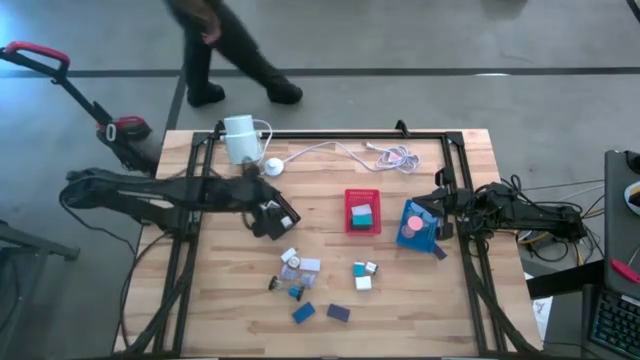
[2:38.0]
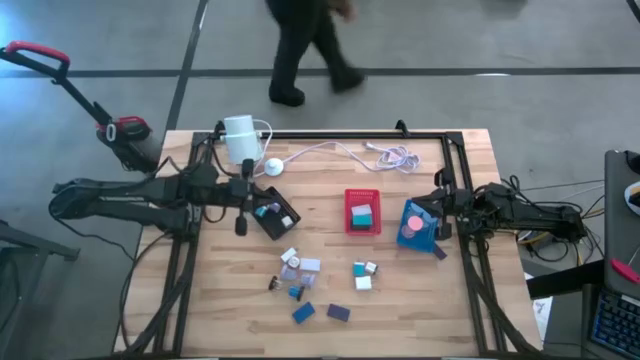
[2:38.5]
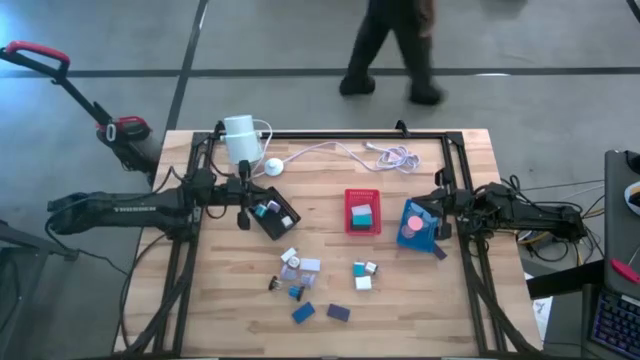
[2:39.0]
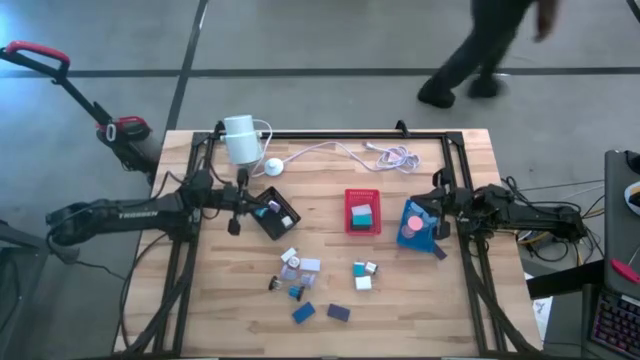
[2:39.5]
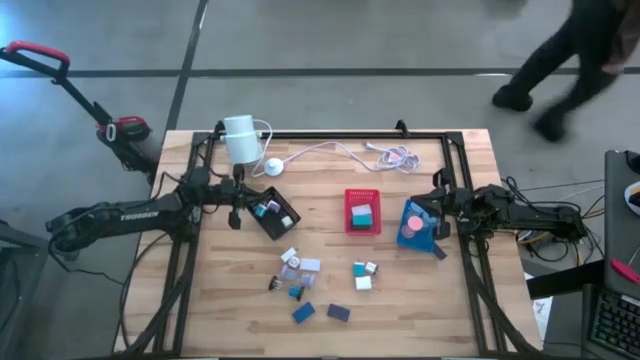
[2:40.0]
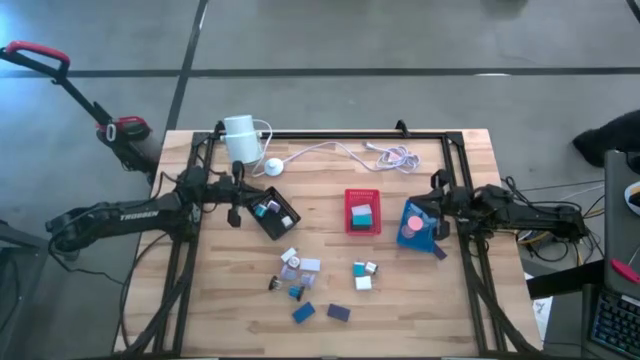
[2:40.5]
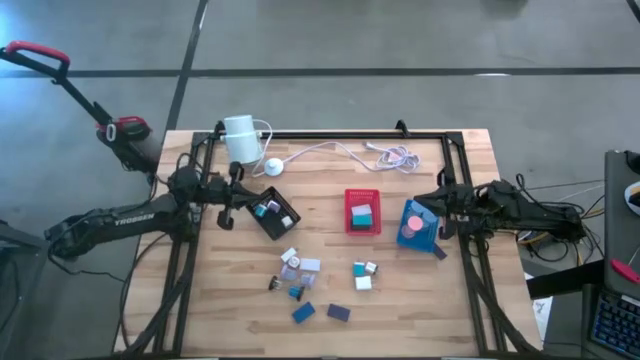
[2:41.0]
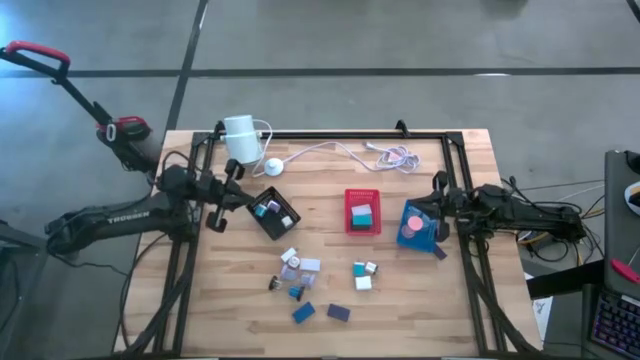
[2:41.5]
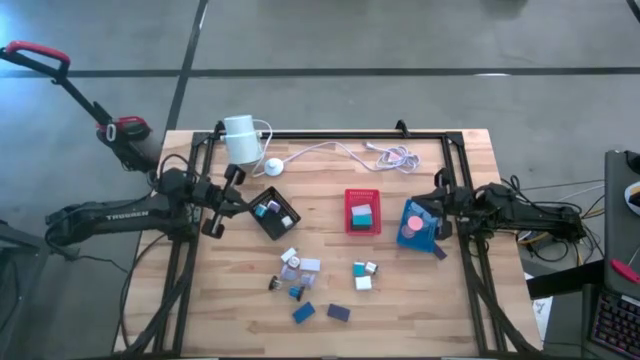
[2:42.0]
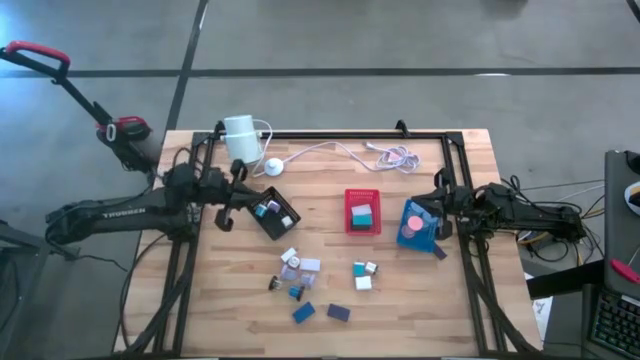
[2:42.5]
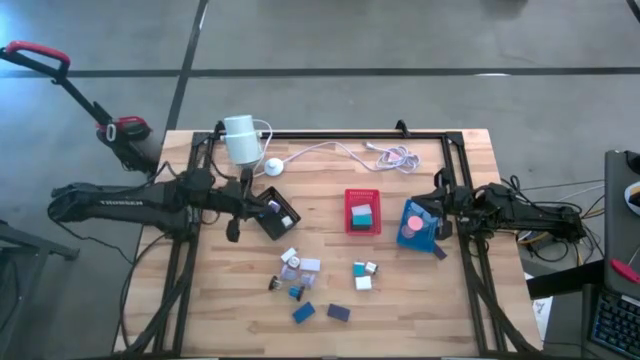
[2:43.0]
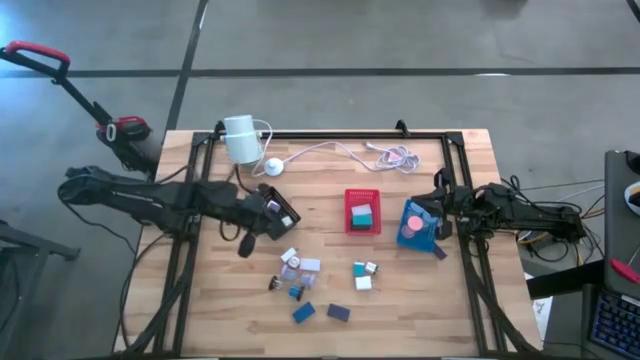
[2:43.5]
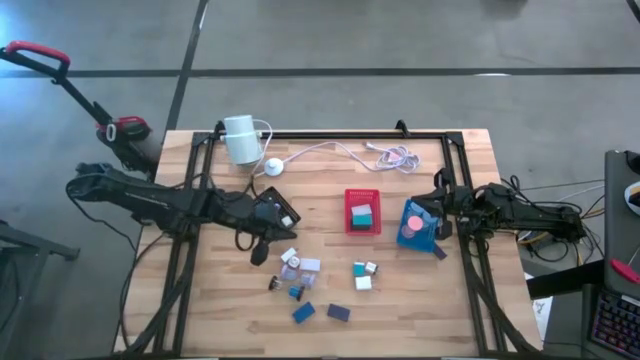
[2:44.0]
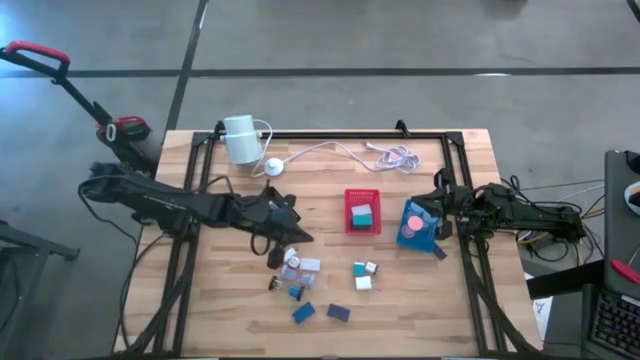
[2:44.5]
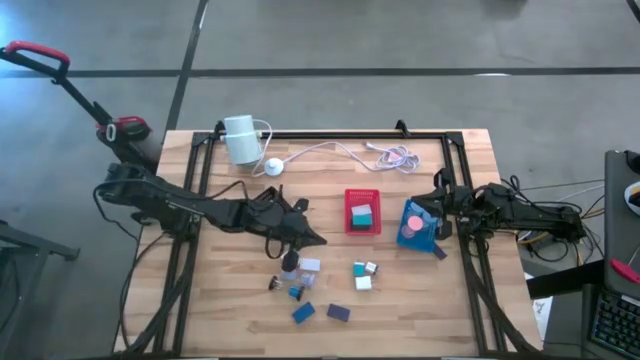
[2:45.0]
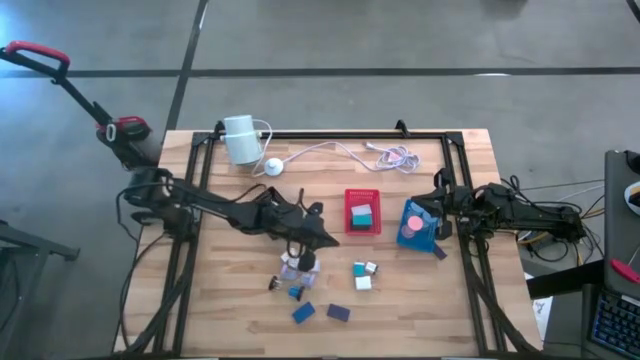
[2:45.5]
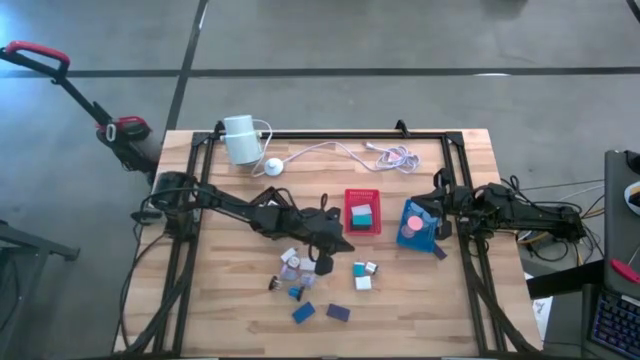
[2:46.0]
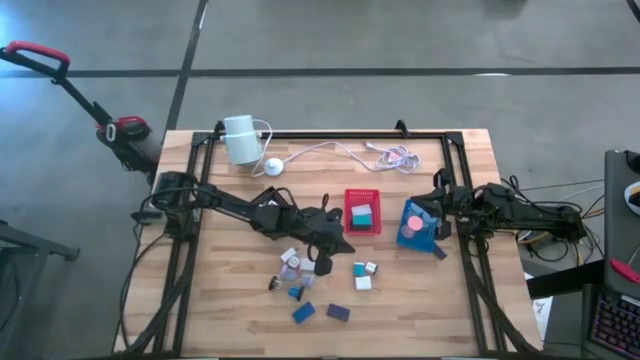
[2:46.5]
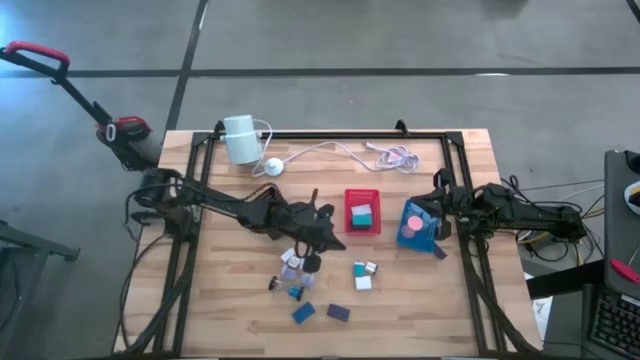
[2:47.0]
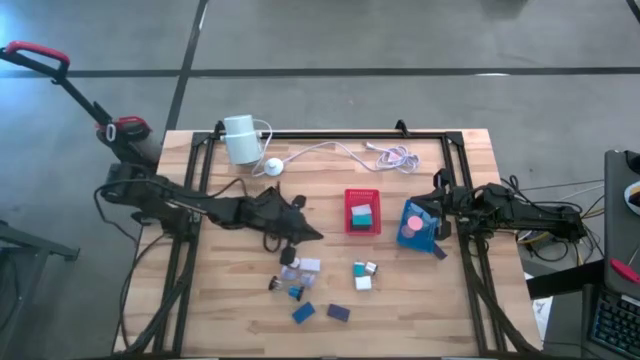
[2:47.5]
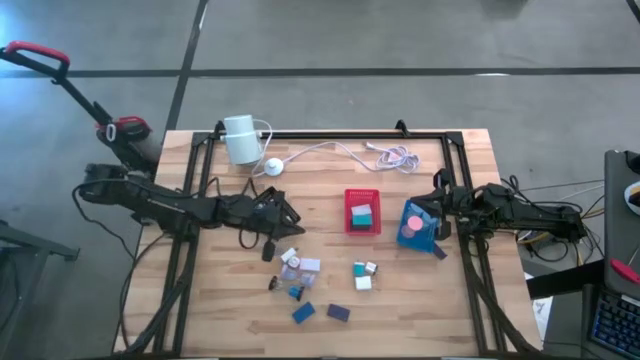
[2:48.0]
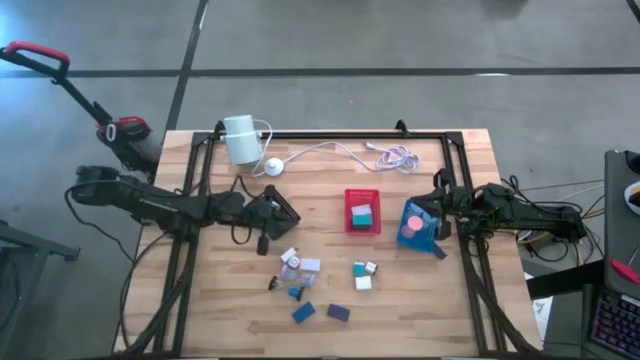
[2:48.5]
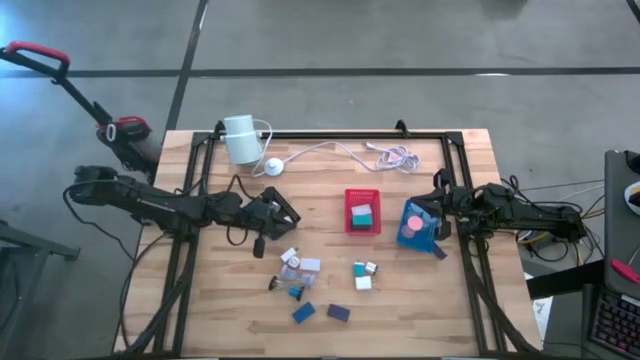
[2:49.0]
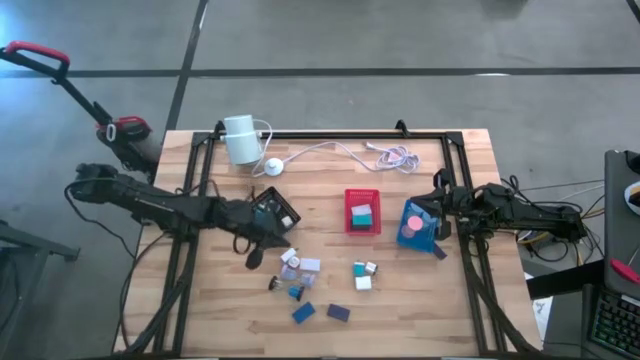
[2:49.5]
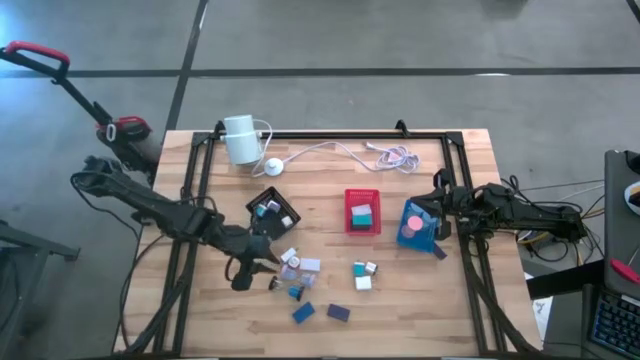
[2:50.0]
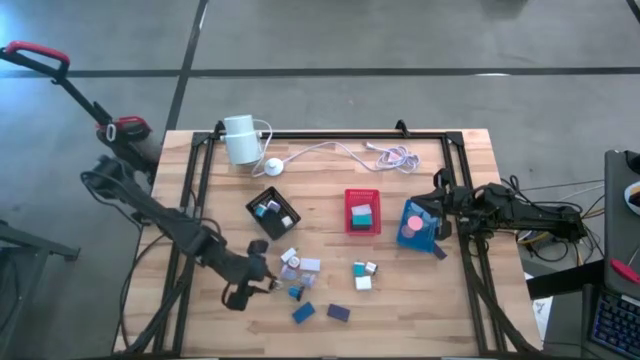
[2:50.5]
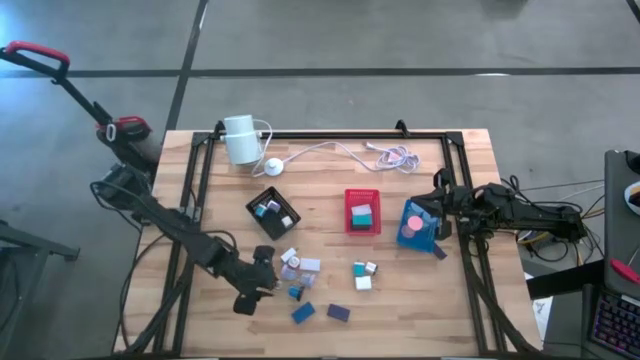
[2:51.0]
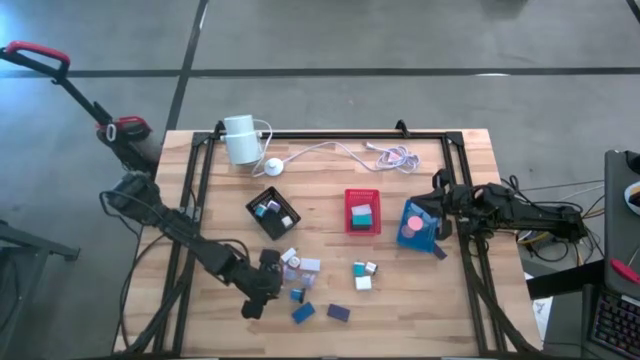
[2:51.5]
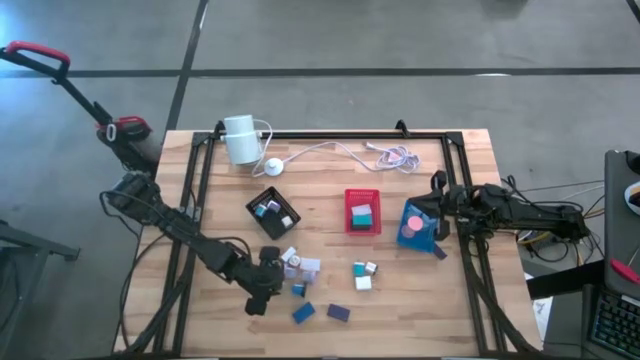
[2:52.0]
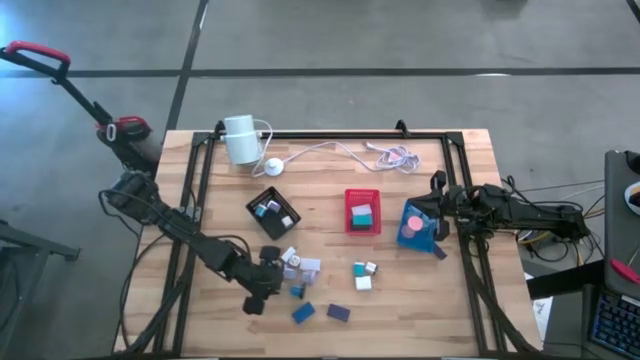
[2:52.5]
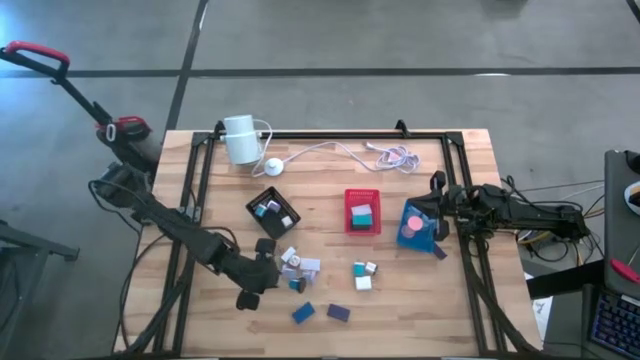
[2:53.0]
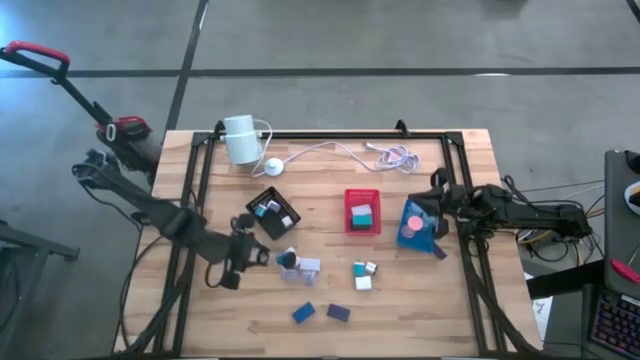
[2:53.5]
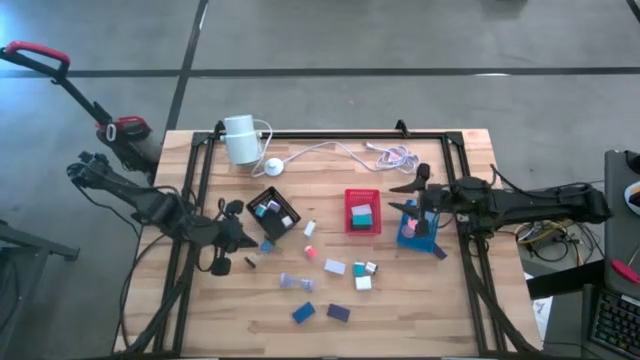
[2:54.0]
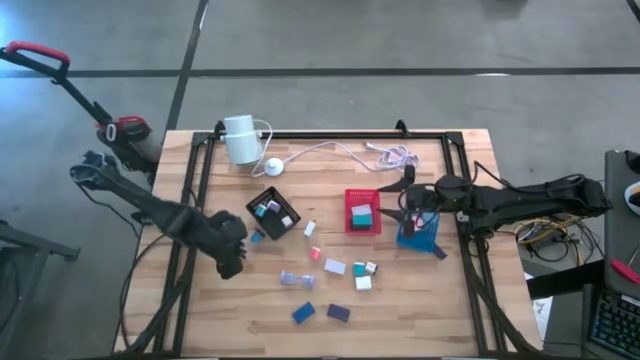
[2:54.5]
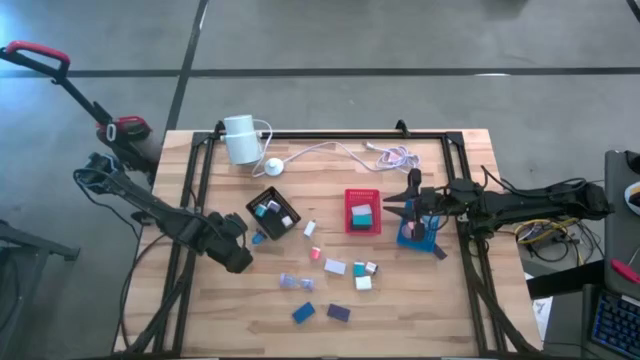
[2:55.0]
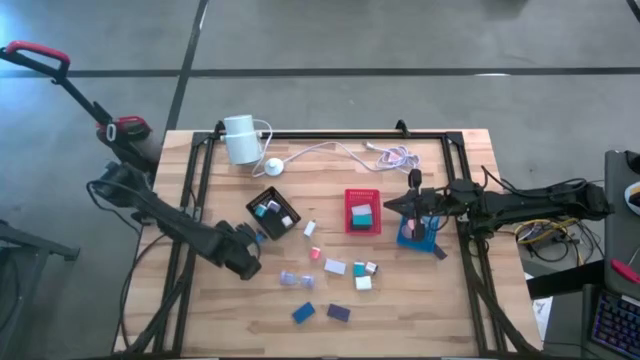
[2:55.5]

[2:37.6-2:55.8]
Task: Pick & Place Office items
Put the black hourglass into the blue bin
